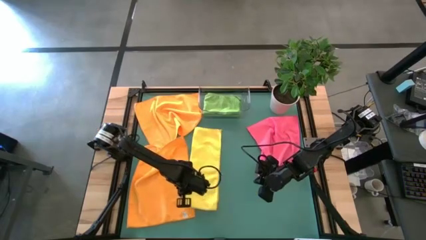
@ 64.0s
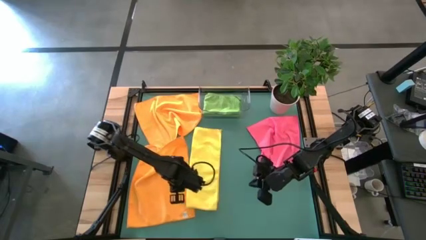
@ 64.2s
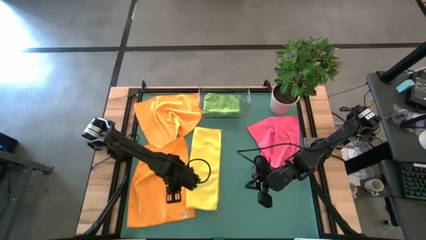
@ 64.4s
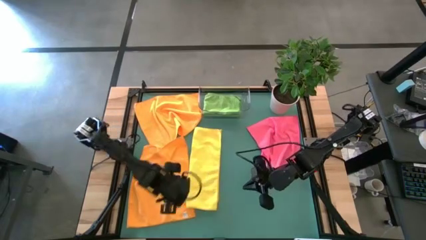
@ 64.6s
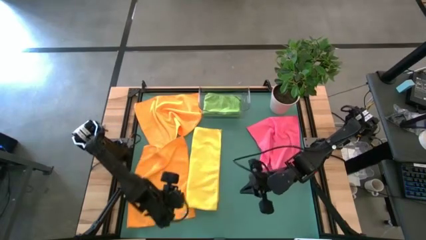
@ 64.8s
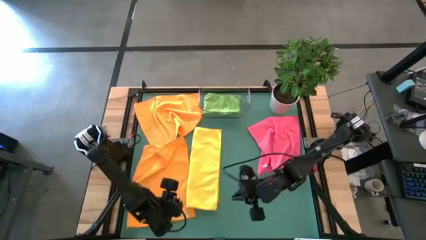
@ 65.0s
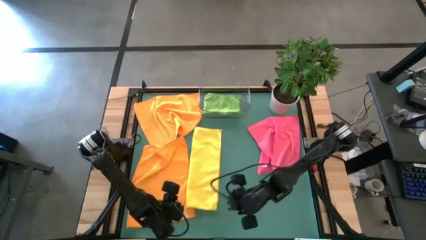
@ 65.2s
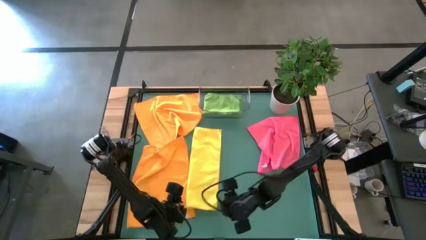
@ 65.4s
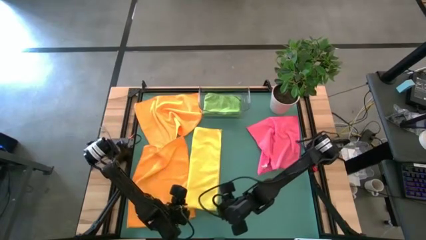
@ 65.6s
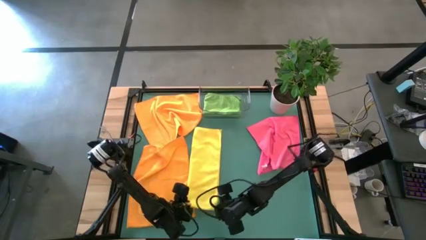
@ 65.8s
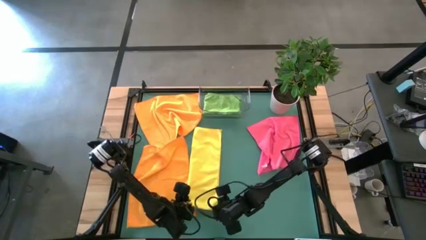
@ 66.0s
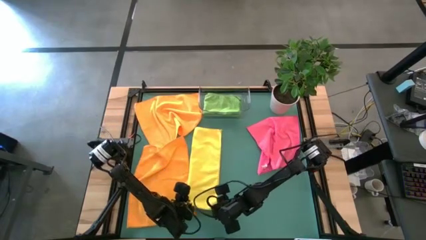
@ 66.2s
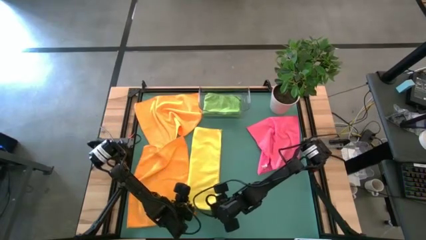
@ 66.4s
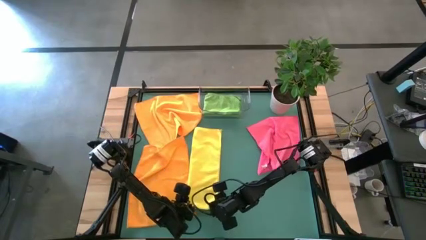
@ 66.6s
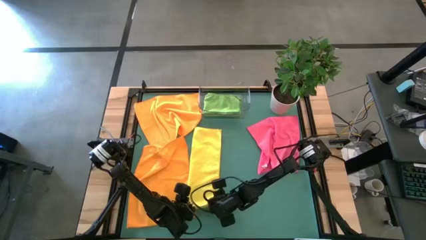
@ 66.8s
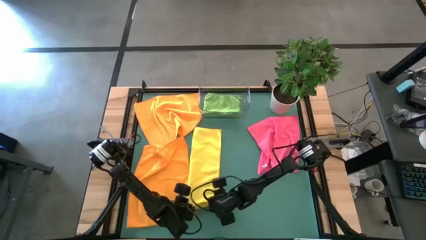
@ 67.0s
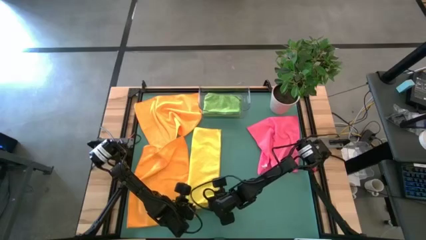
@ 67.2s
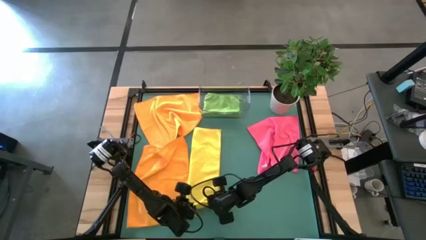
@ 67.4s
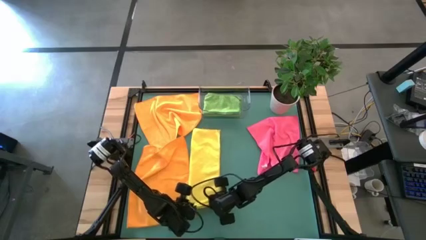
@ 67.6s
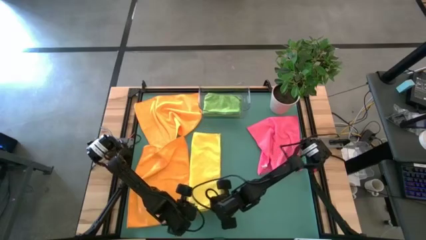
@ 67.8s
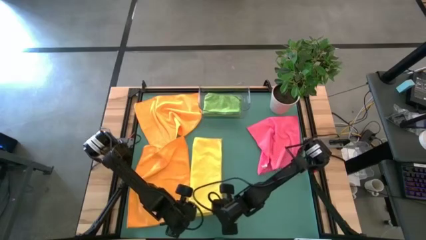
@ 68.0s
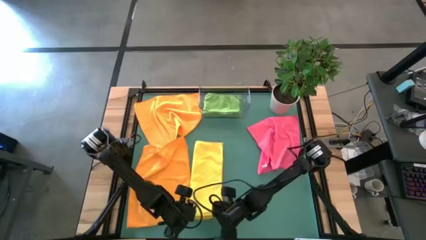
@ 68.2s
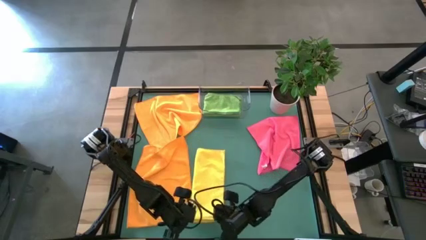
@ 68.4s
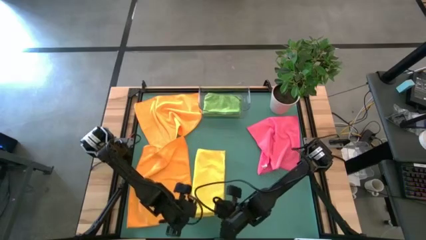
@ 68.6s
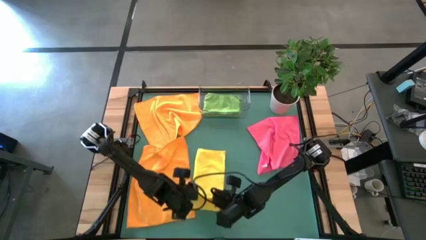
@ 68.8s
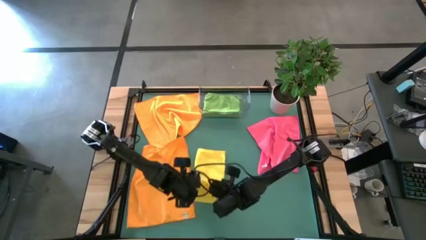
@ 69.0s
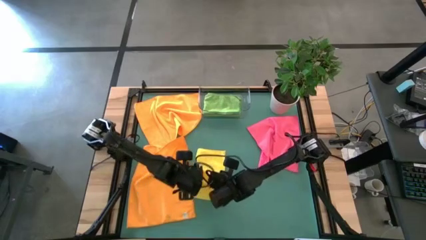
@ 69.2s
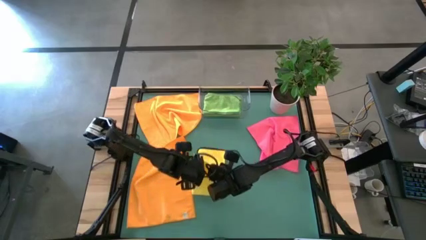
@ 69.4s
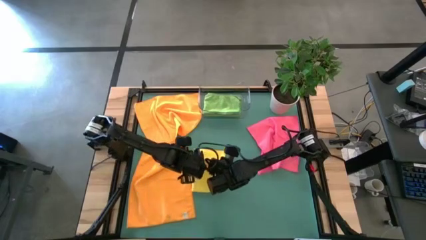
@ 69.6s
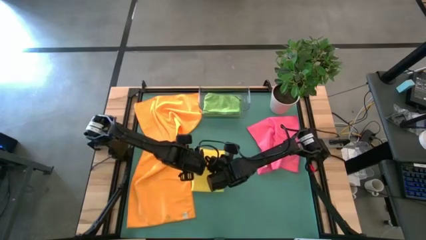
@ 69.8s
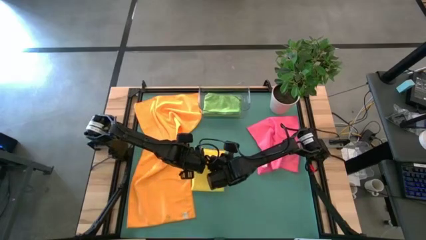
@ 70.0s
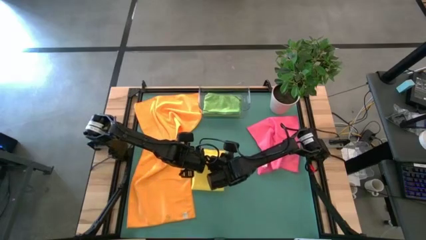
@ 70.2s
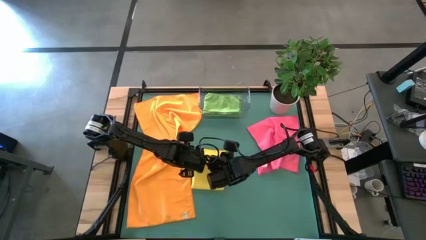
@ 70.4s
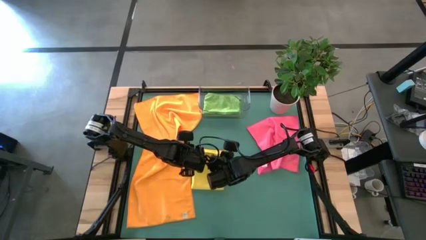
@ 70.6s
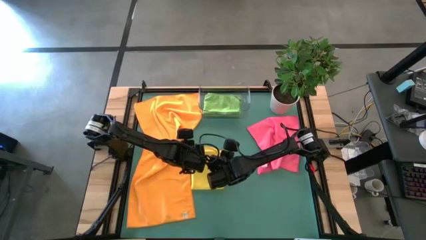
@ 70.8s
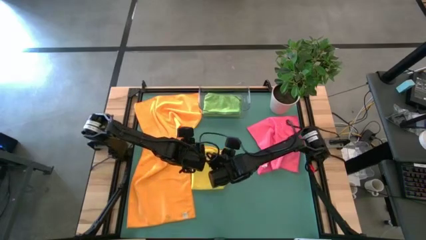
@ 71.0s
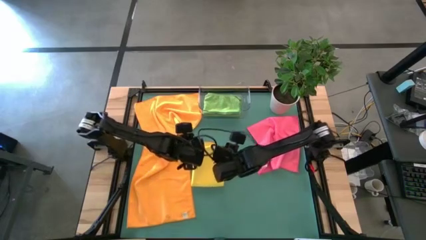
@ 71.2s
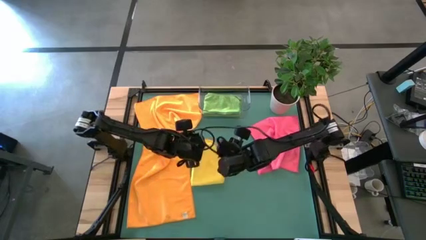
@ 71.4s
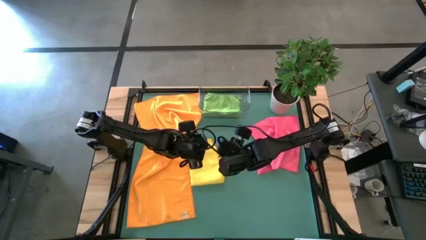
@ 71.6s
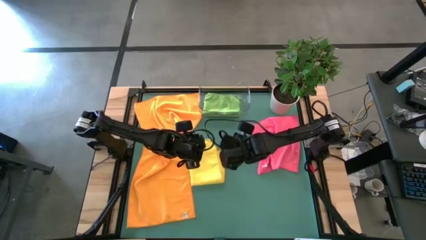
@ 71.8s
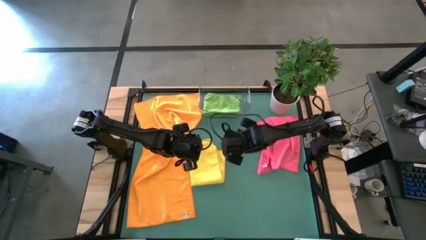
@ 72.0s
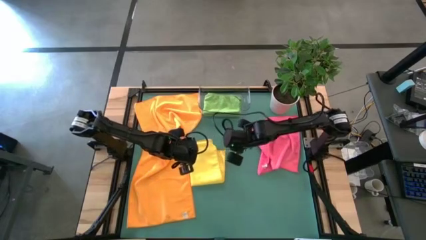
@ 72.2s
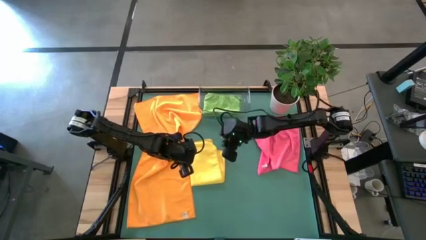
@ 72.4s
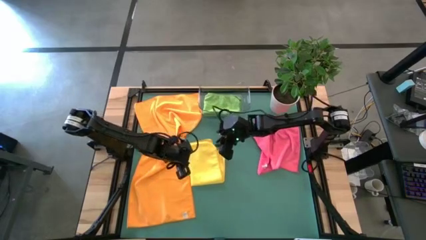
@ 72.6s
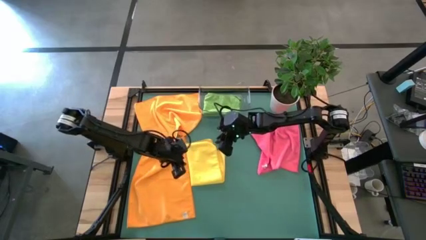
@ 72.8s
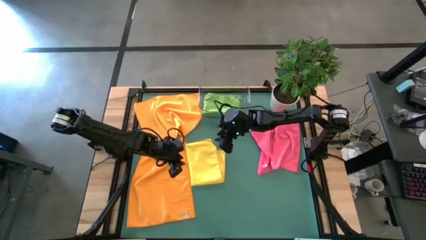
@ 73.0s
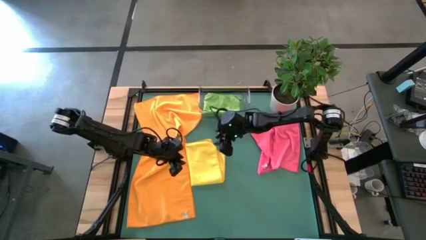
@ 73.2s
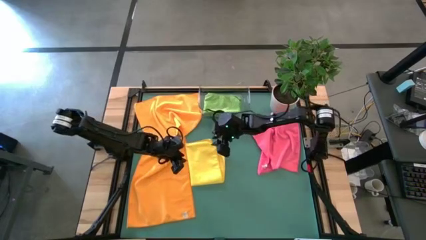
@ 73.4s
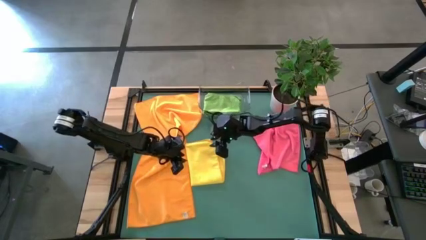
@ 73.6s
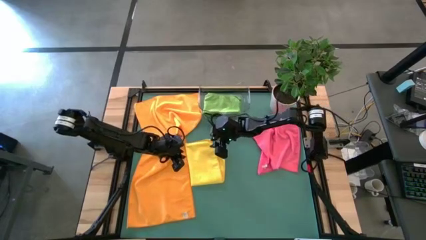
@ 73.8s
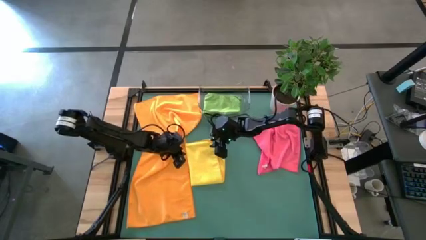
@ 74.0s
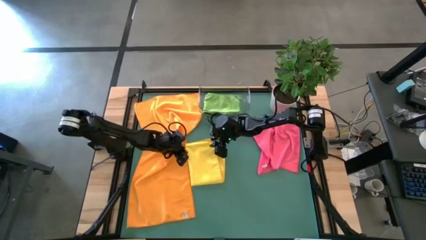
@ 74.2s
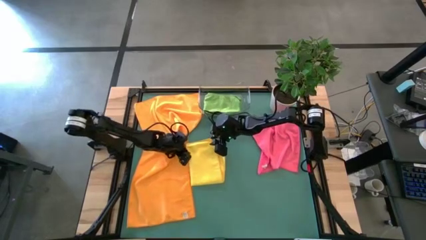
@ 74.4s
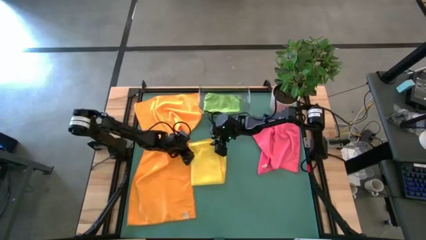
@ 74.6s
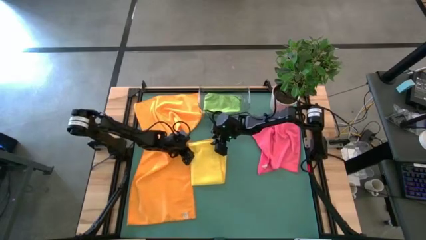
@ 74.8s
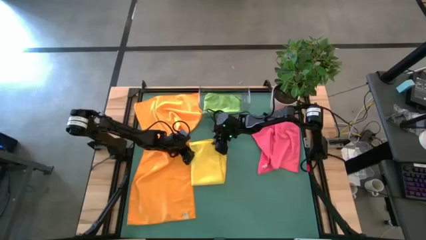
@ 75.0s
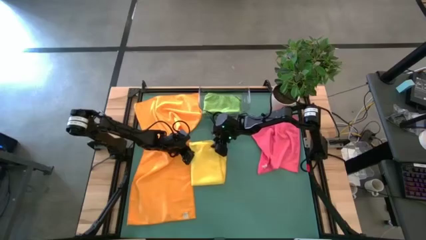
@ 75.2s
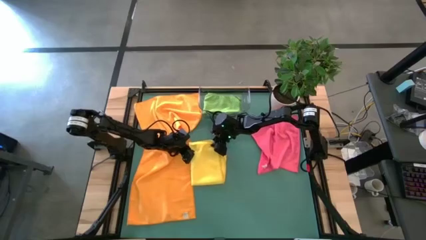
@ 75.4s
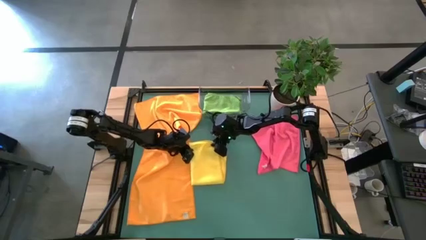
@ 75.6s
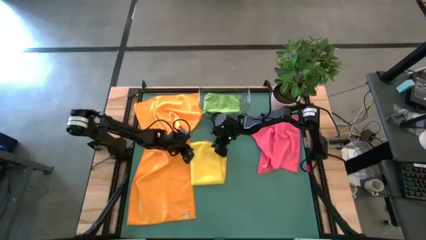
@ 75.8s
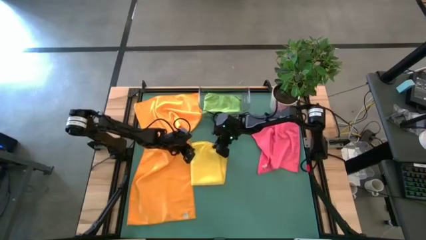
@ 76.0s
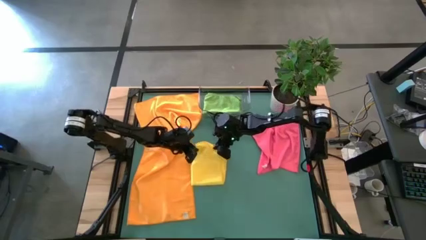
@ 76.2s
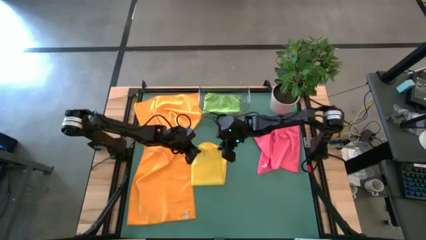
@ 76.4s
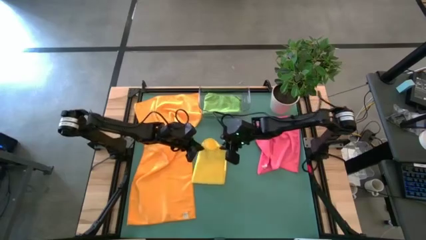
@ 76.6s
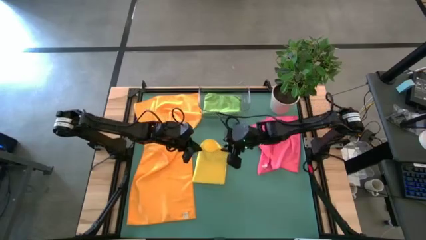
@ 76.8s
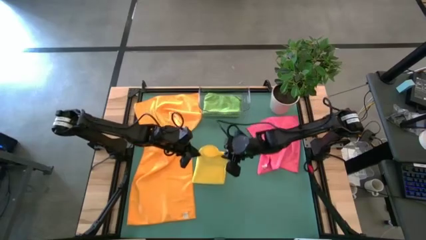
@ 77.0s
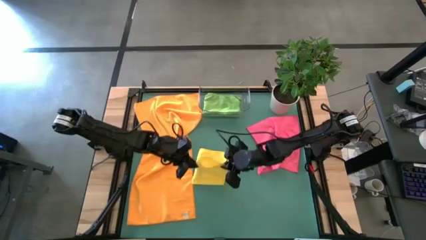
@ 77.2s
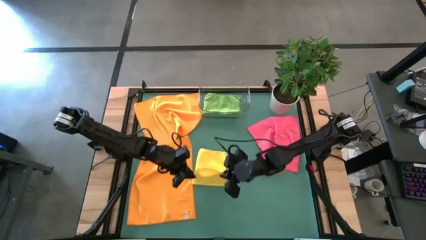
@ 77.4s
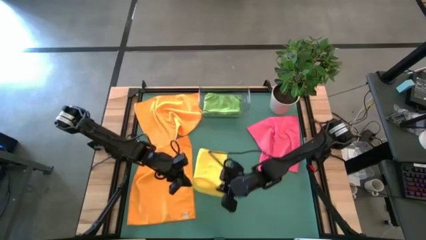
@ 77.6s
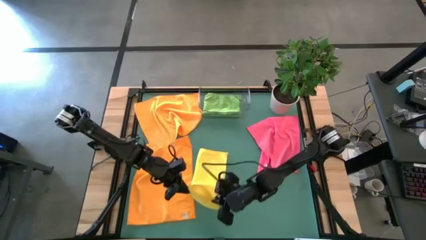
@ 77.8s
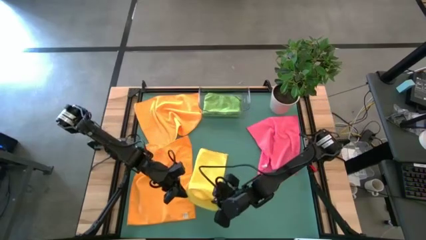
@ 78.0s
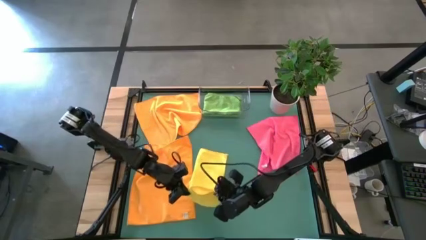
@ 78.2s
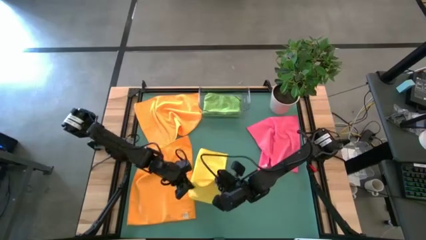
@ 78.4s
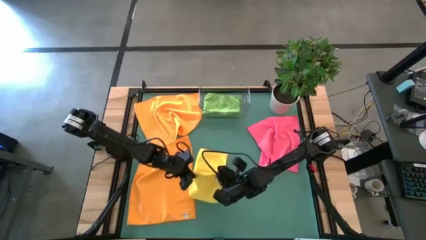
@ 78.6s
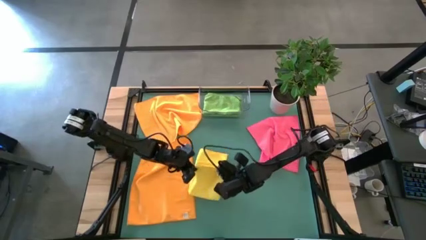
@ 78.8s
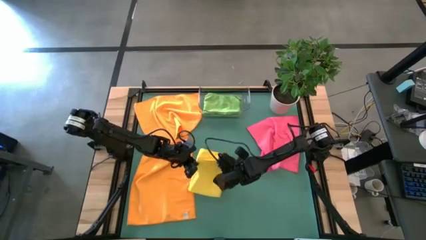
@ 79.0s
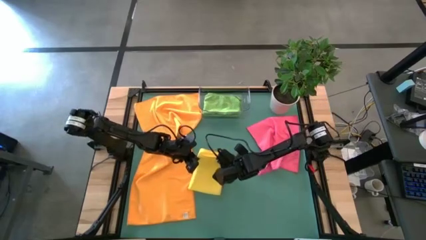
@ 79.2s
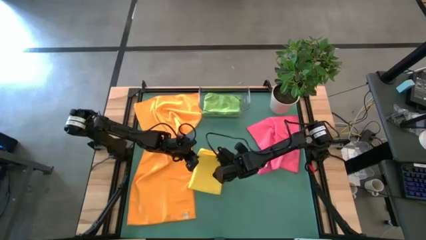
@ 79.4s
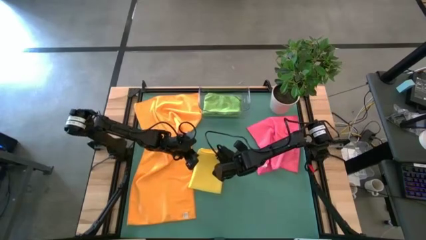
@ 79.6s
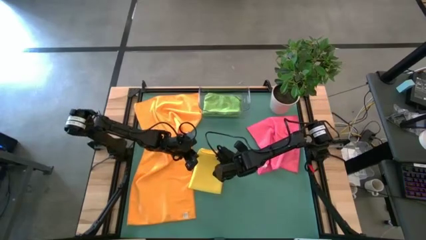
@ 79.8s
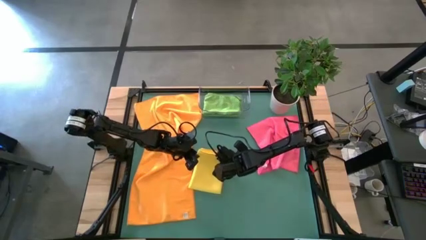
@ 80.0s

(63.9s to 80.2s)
Task: Fold microfiber towels
Fold the yellow towel

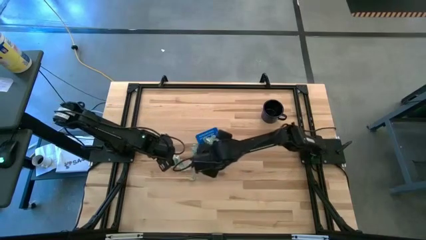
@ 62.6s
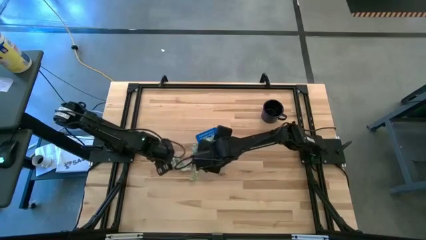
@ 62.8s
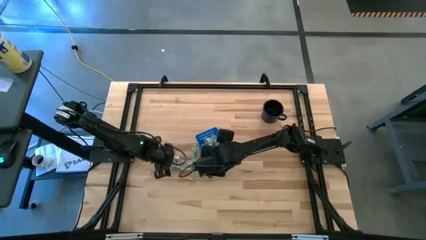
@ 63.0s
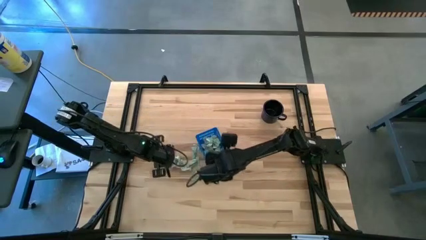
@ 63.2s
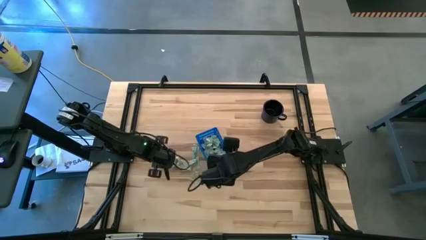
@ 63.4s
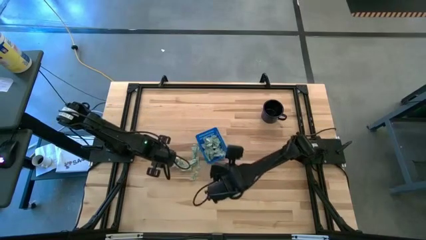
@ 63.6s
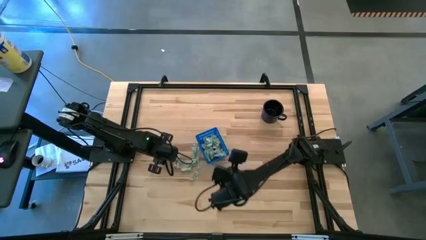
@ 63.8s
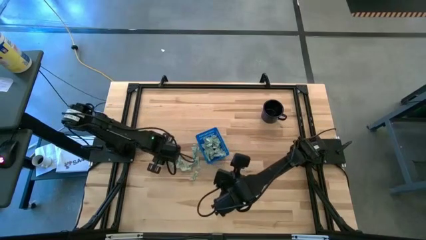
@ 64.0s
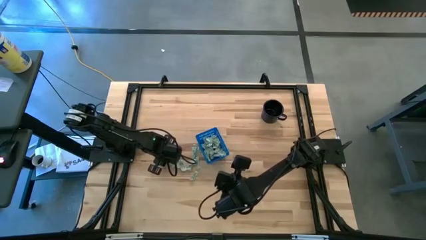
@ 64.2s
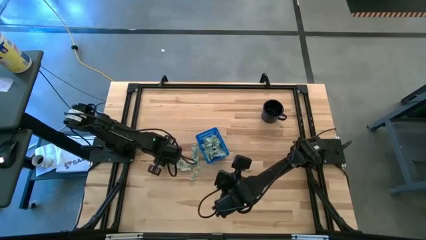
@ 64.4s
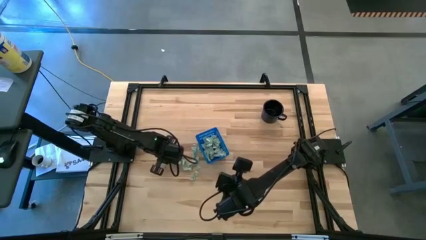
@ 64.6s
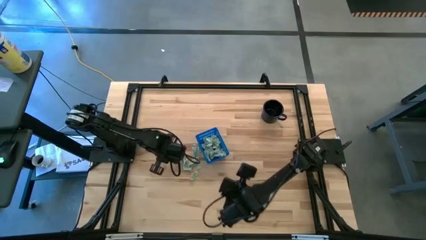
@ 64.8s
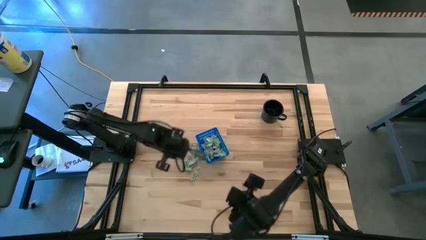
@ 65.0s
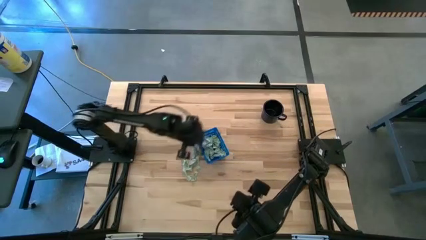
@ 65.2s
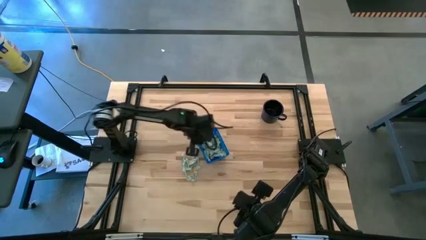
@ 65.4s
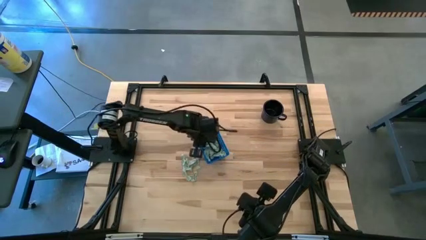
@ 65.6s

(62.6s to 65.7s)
Task: Pick and place Stevia / Truvia into bins
Put the stevia packet into the basket
